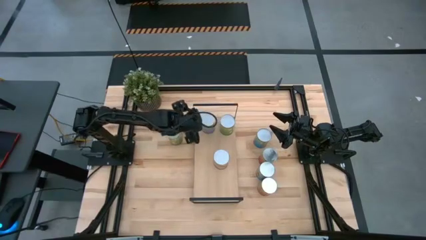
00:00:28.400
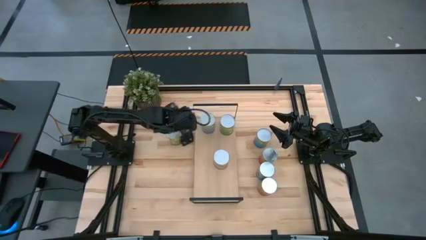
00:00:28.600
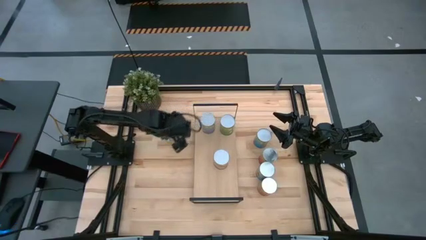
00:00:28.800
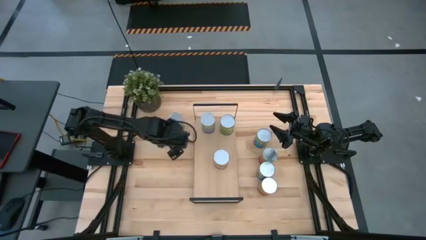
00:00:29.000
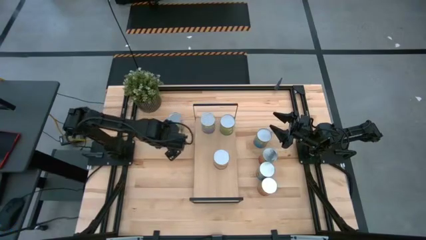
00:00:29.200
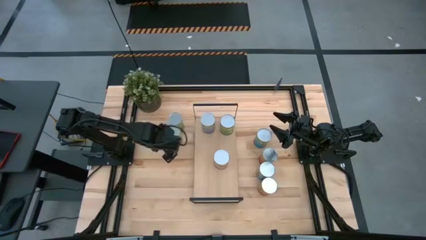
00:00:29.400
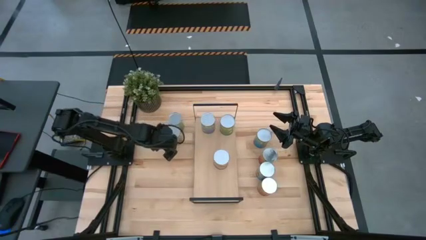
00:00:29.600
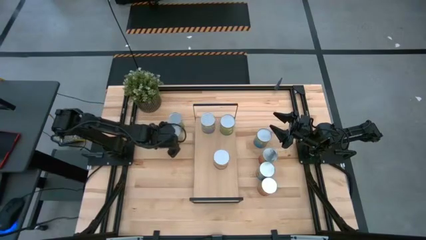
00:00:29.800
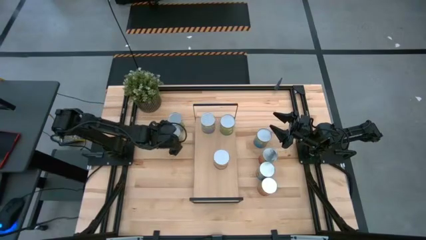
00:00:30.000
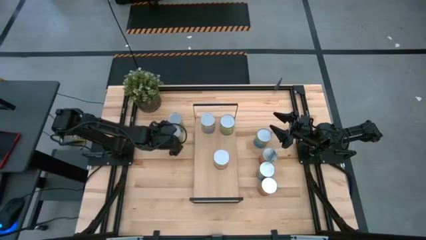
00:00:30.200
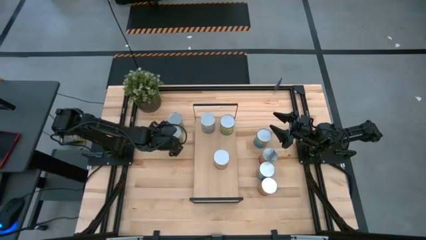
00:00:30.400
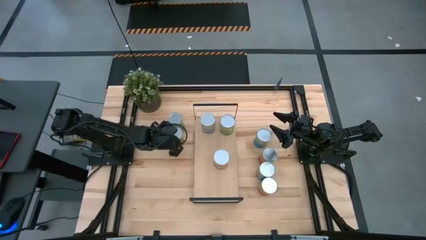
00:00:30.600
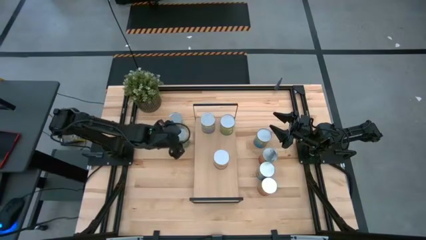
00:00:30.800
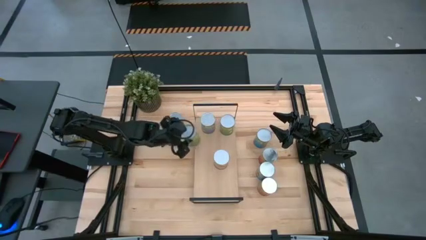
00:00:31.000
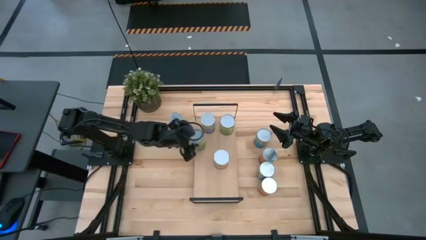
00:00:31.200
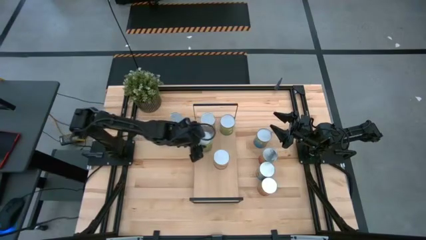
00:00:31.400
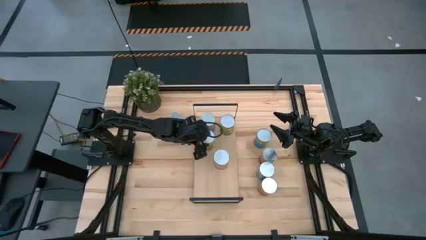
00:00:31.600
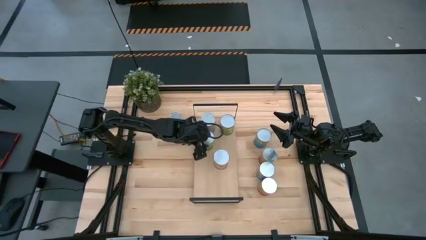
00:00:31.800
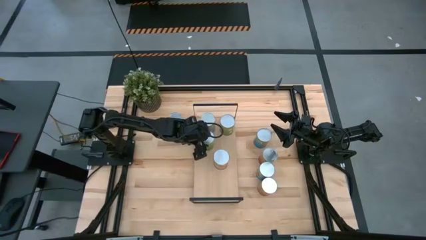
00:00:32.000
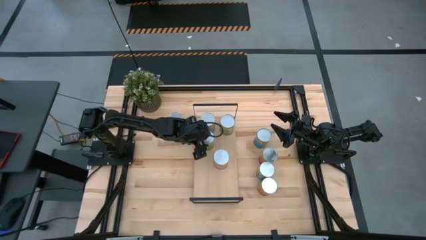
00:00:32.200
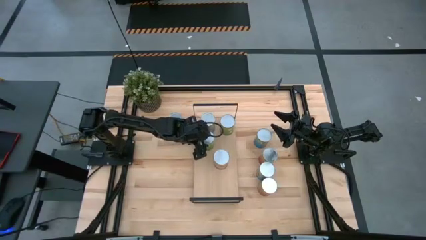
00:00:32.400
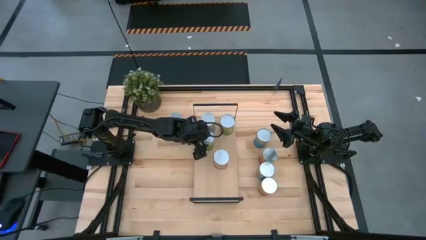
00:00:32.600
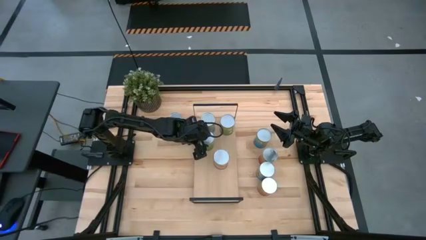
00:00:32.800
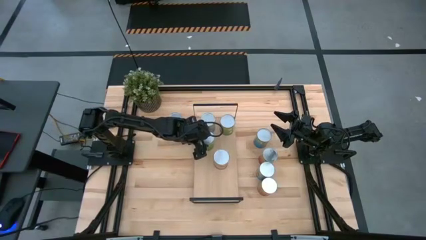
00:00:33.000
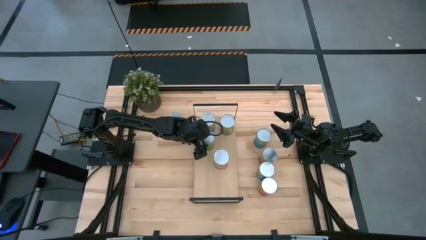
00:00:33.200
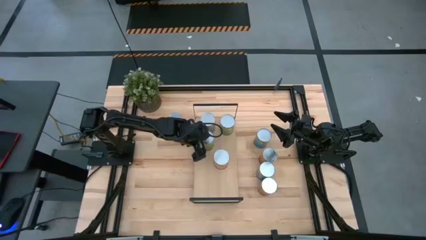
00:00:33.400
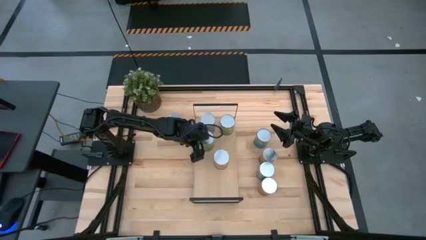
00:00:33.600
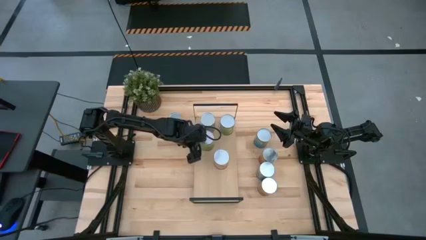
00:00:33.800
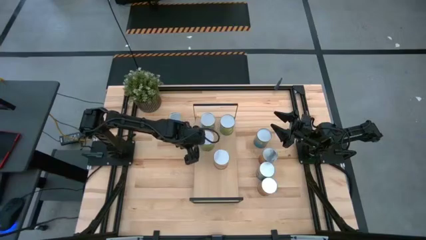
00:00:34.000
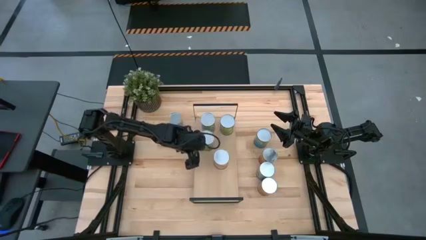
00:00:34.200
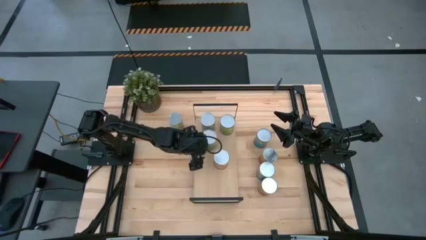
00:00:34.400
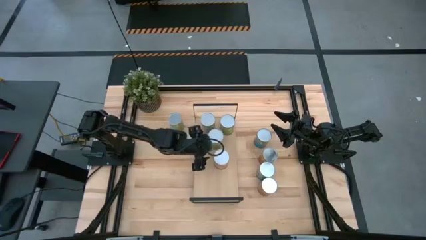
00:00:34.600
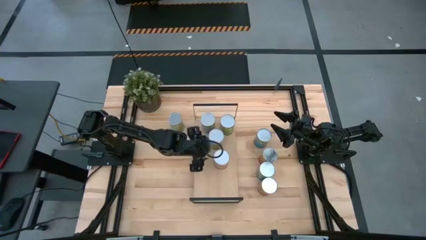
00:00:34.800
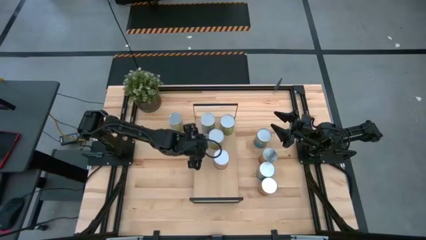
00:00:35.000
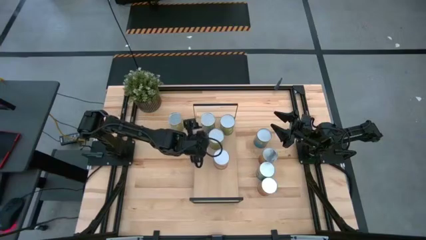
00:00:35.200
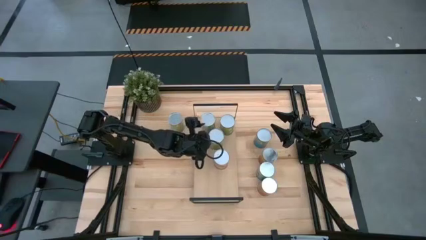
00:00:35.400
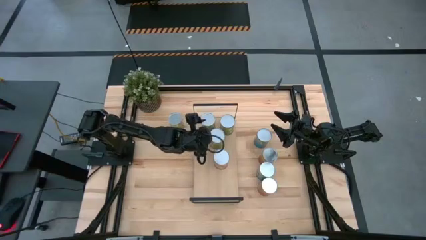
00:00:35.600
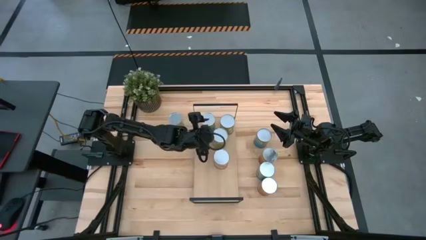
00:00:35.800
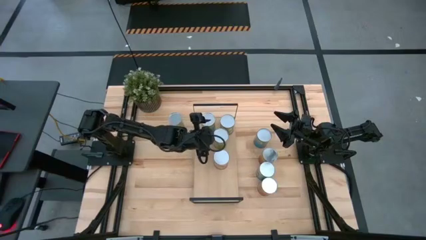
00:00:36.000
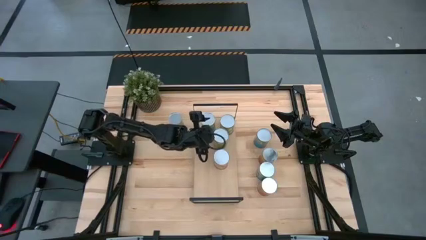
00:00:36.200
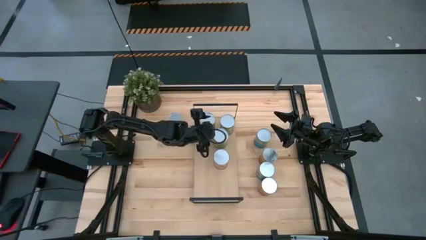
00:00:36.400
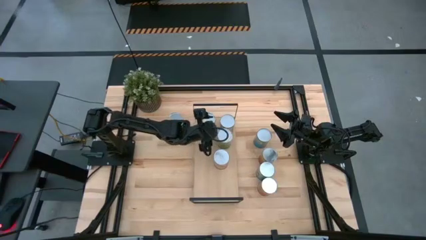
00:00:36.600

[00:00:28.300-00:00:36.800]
Task: Pick and place cans onto a shelf
Put the bottom canned oranges on the shelf

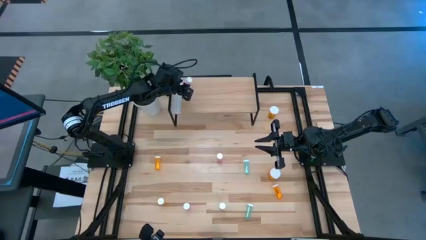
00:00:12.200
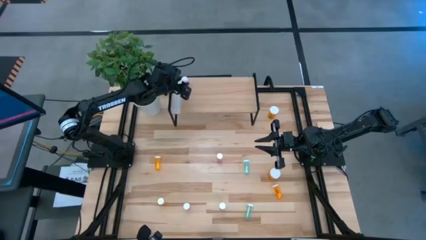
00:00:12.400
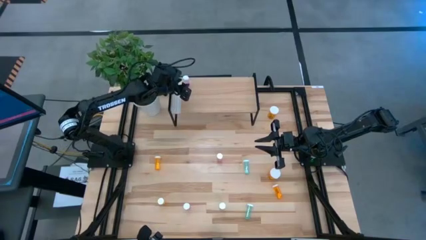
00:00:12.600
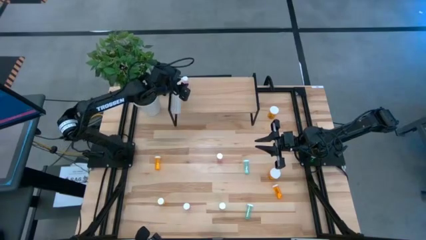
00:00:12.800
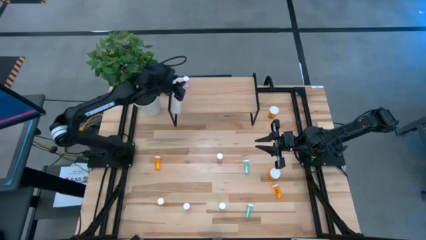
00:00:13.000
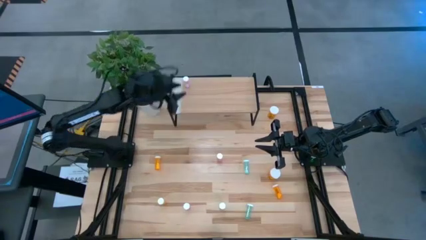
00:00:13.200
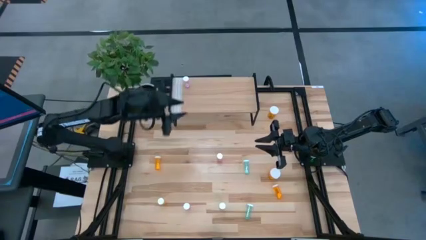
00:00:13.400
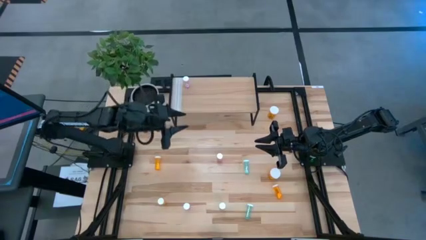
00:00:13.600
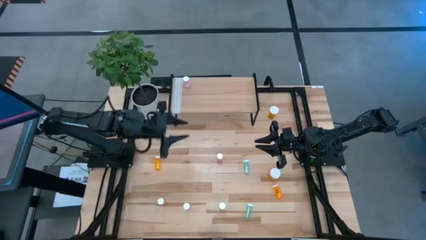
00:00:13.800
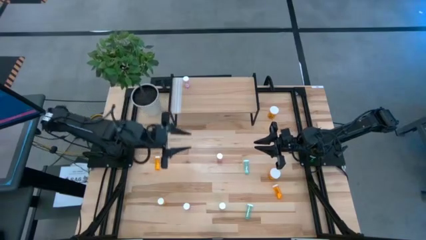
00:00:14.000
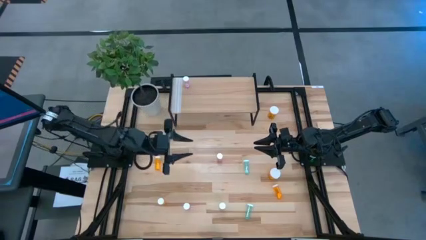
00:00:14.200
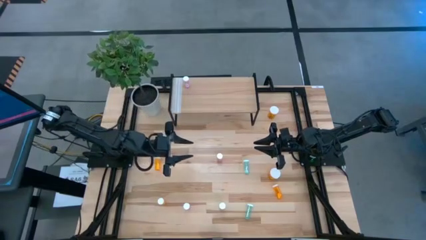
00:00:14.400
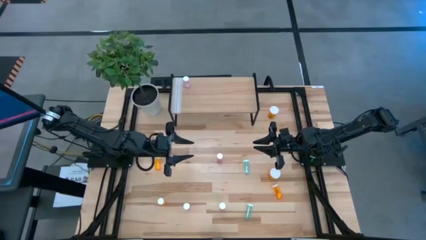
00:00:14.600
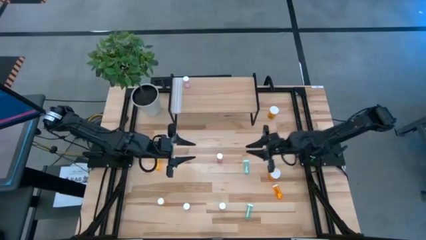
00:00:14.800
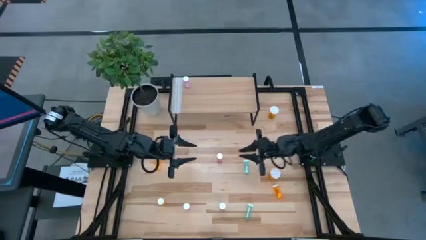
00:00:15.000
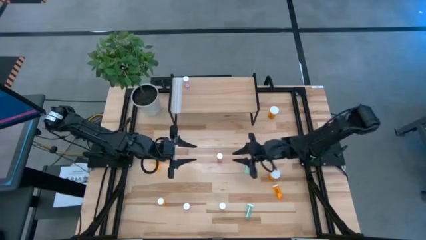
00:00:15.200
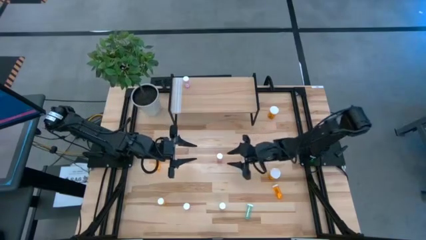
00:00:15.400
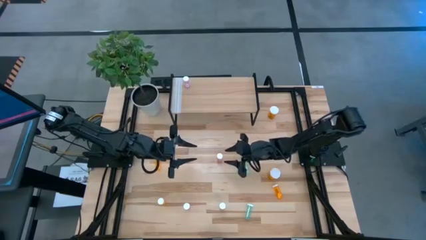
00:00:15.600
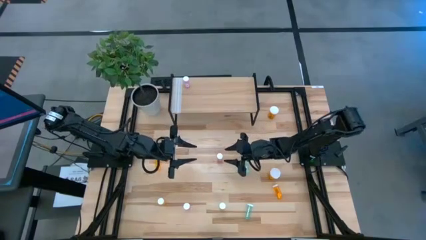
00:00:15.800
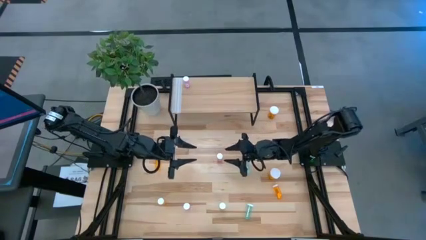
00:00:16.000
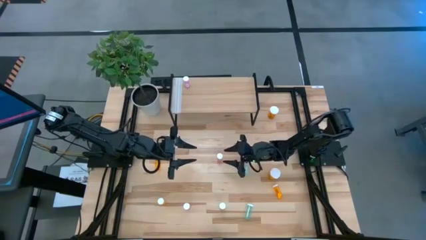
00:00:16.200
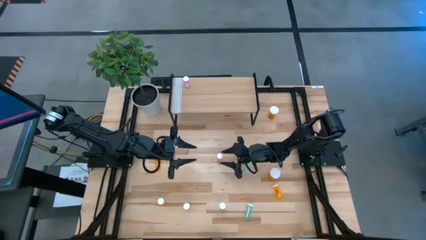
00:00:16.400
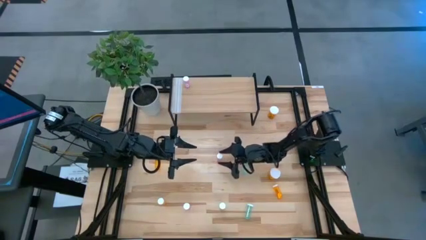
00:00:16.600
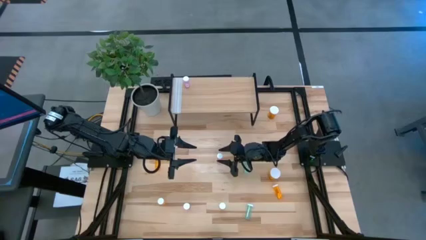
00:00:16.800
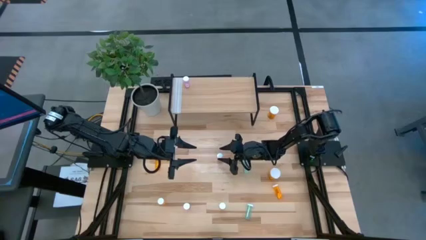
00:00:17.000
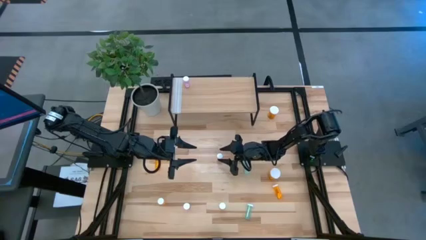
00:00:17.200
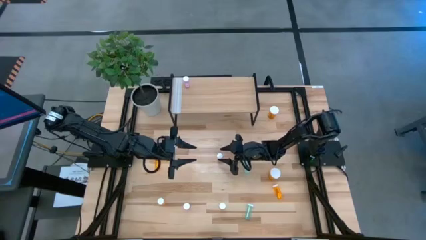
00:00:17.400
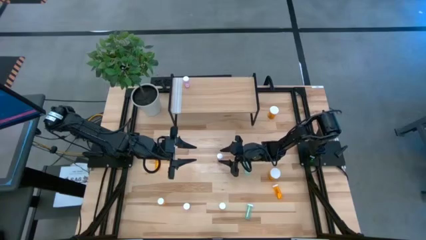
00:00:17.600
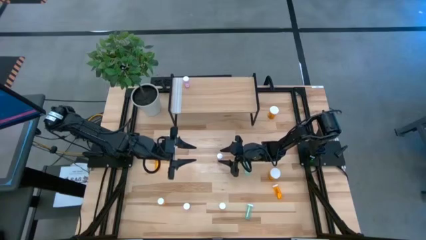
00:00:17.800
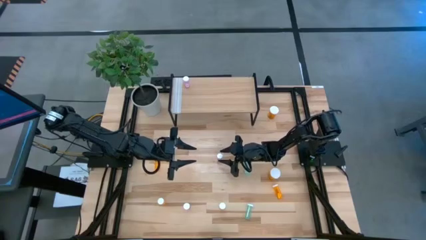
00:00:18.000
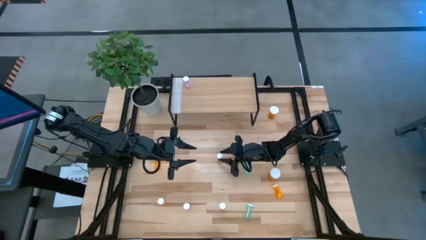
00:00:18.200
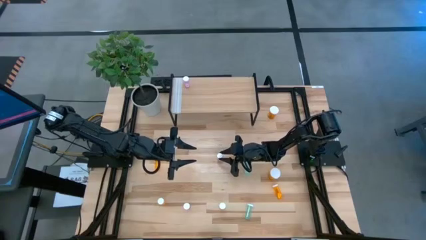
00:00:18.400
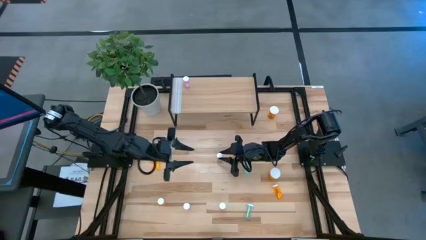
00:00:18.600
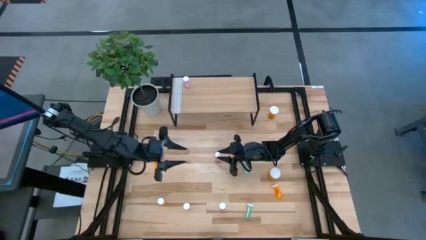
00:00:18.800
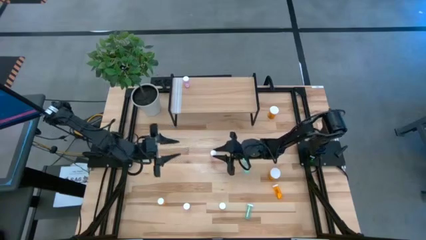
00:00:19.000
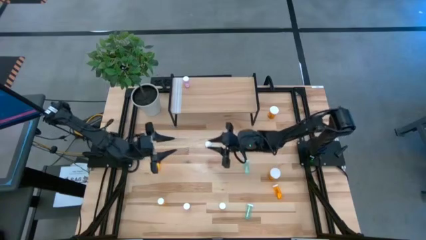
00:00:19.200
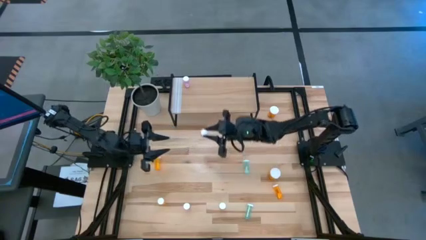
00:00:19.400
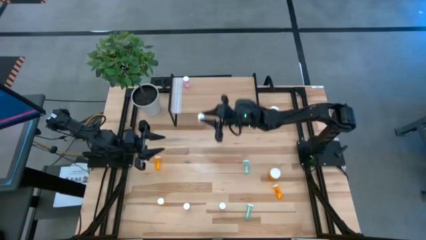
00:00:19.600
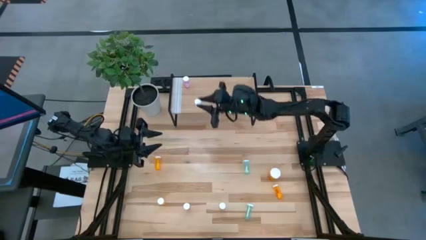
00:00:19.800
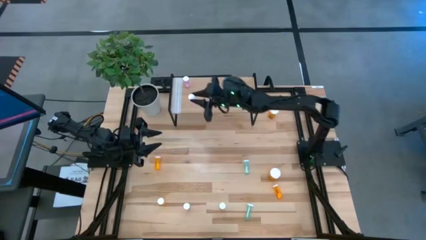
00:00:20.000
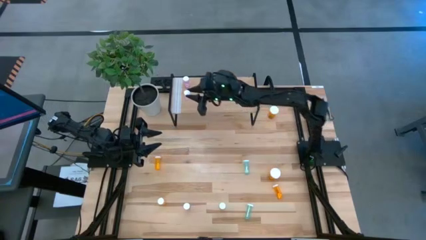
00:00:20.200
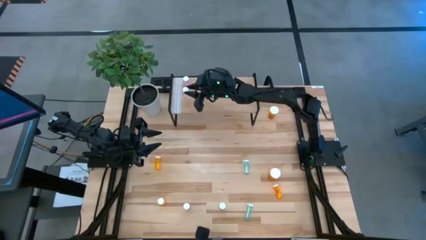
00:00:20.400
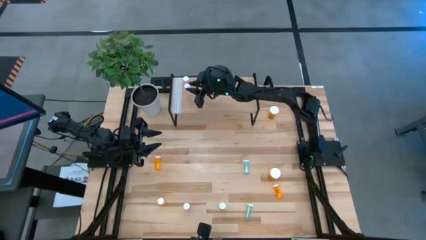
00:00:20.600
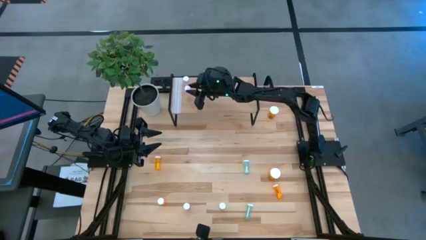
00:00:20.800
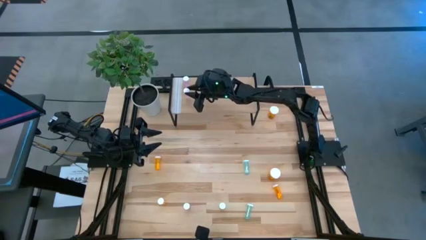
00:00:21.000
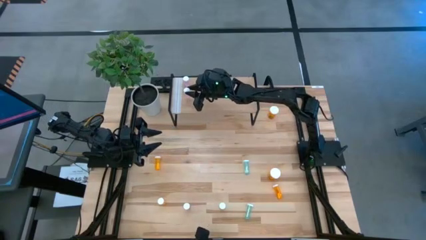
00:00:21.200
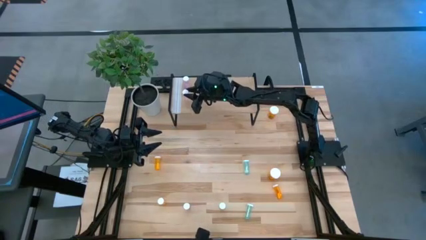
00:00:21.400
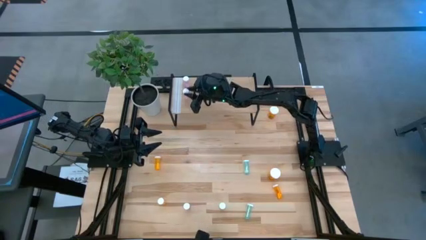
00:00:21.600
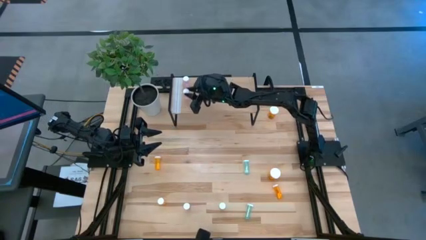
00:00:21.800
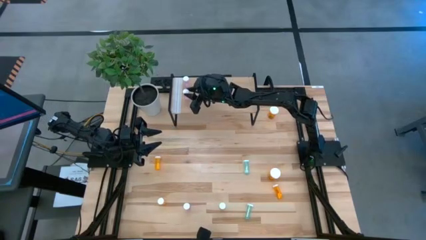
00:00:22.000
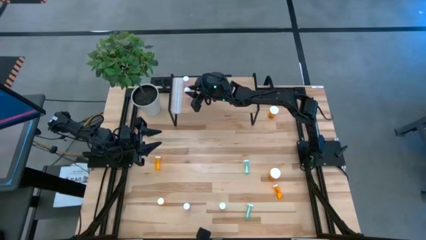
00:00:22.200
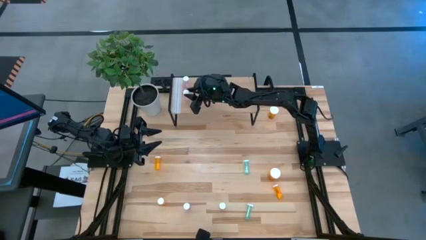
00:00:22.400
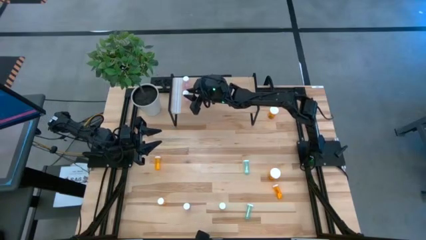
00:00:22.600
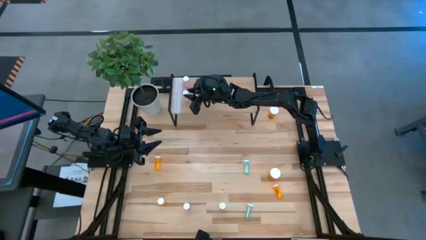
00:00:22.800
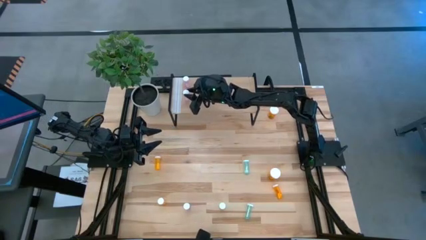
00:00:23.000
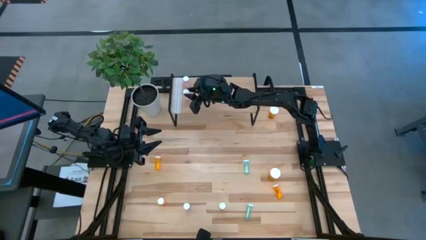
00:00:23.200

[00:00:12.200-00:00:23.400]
Task: Pick and place medicine bottles onto shelf by color
Put the top pink pill bottle aligned with the other pink pill bottle on the shelf
